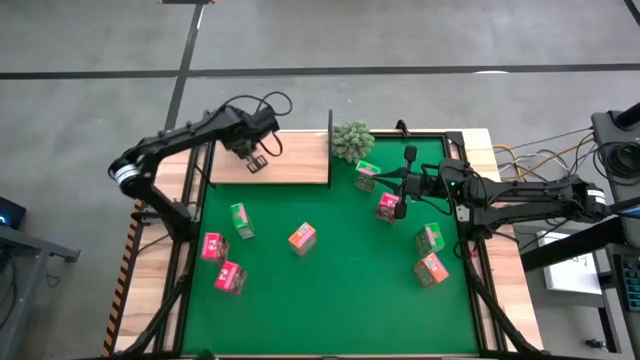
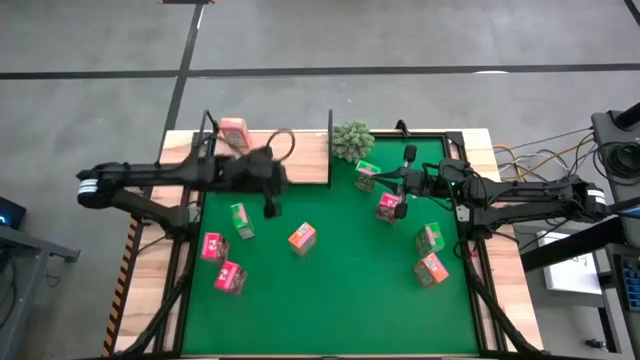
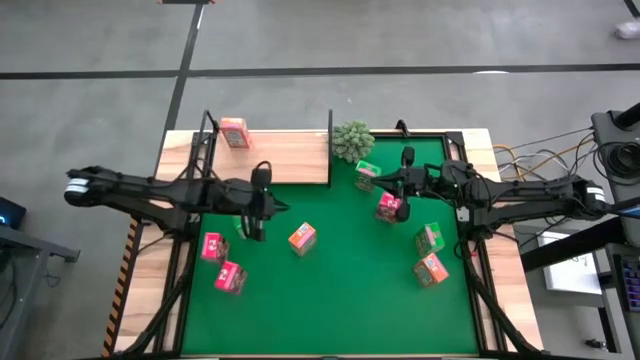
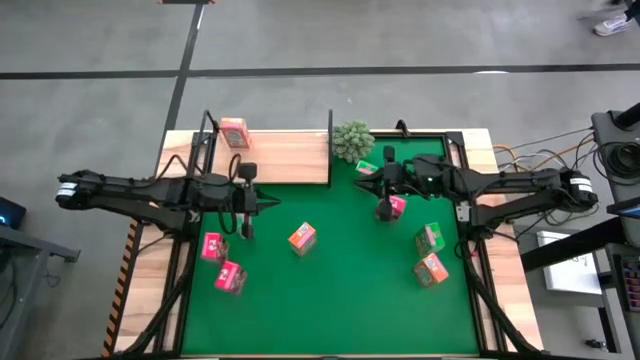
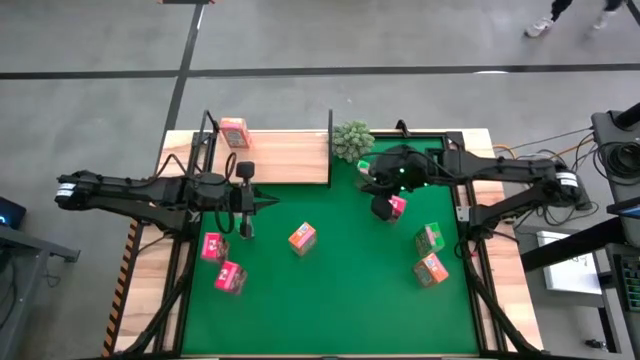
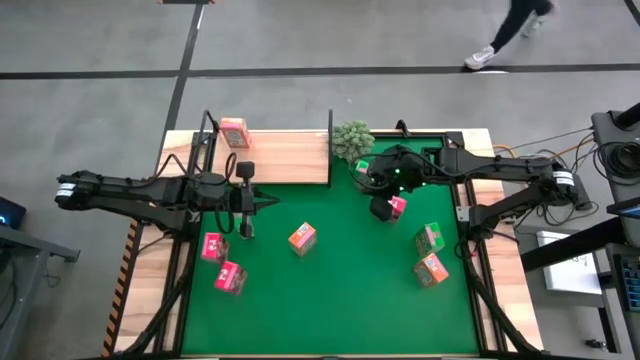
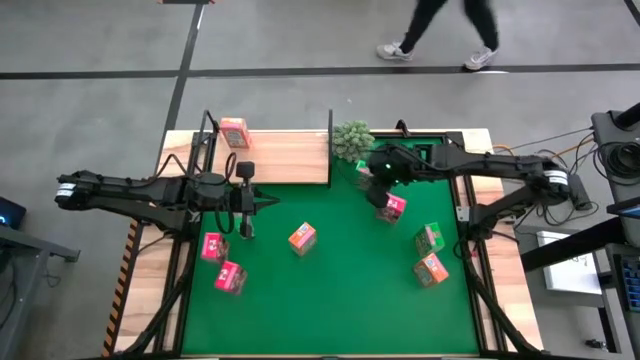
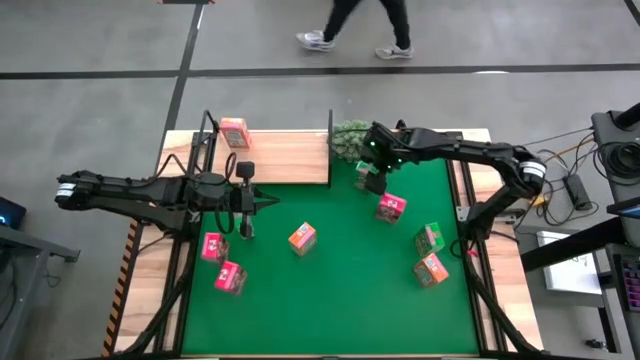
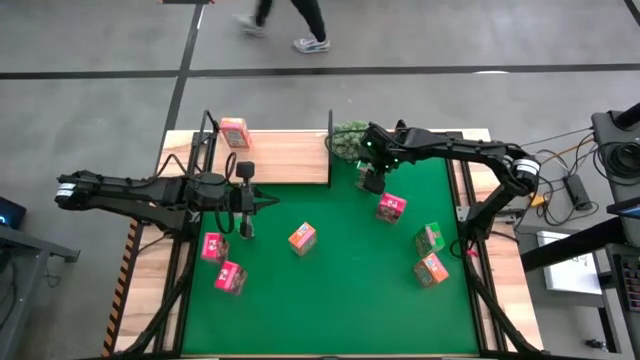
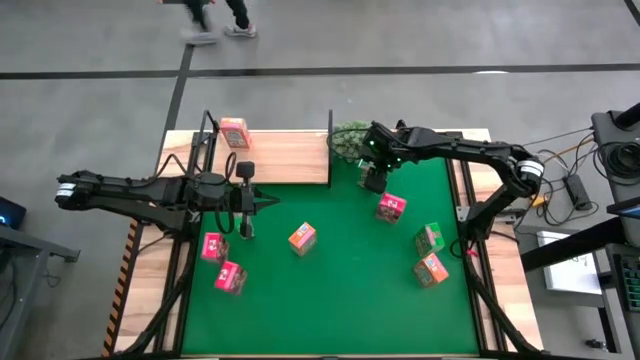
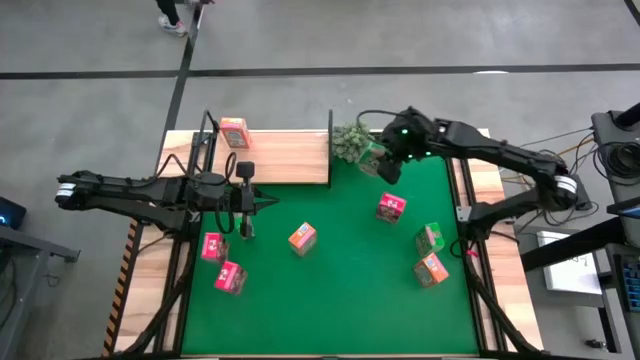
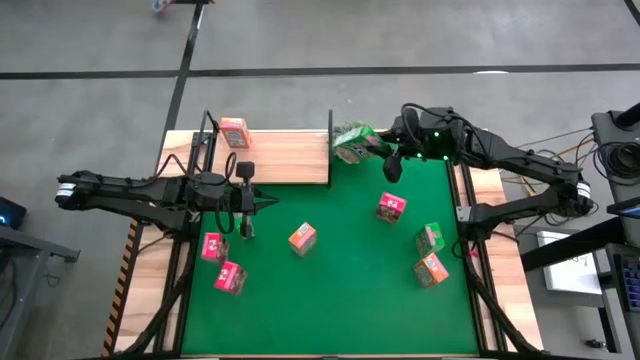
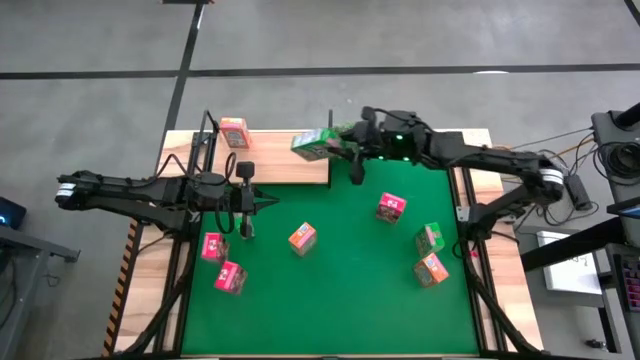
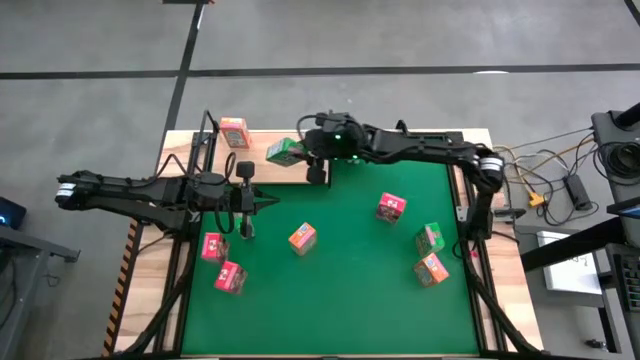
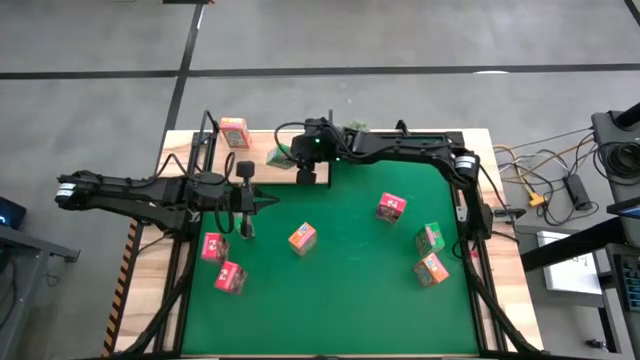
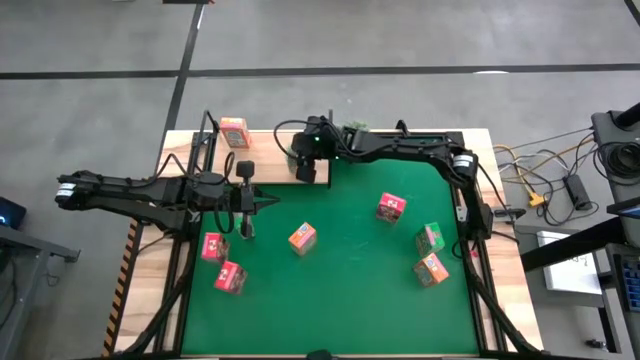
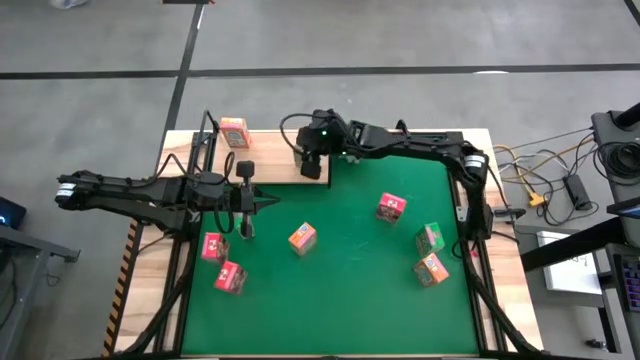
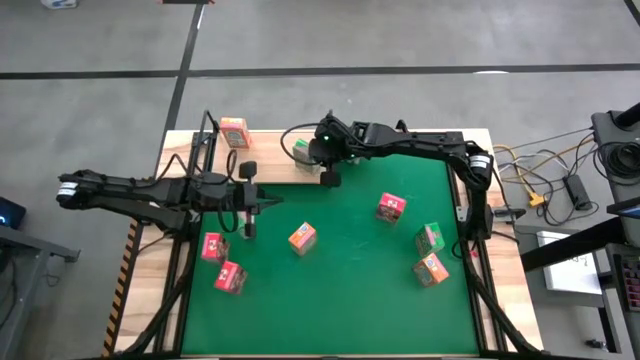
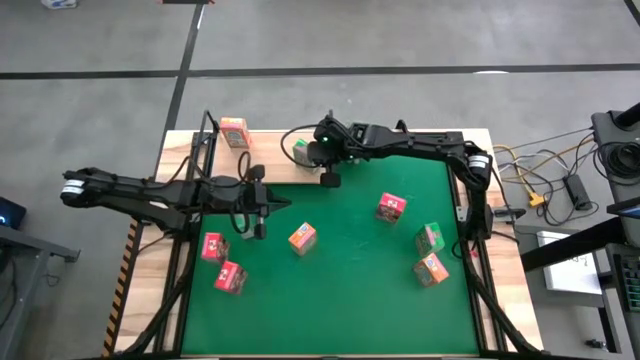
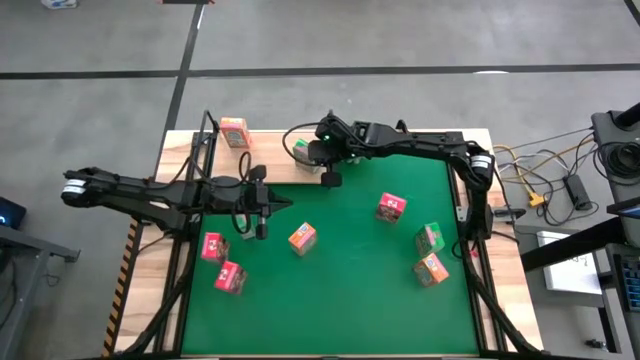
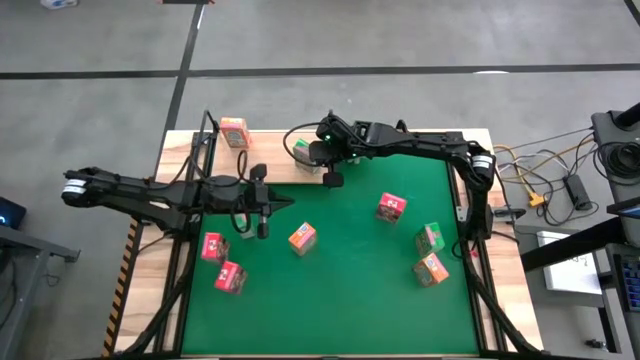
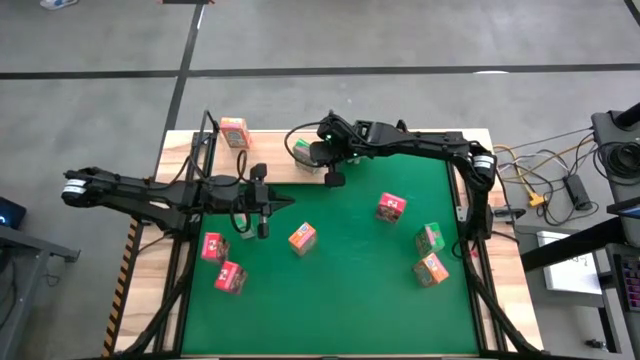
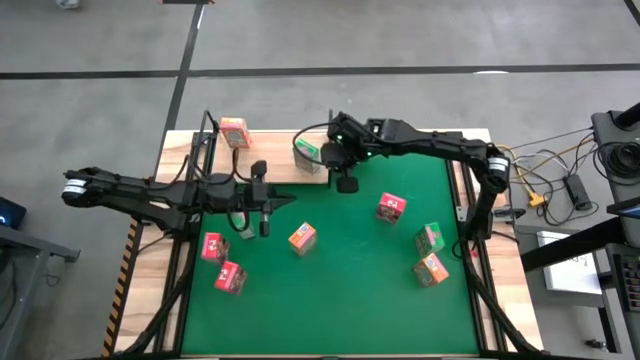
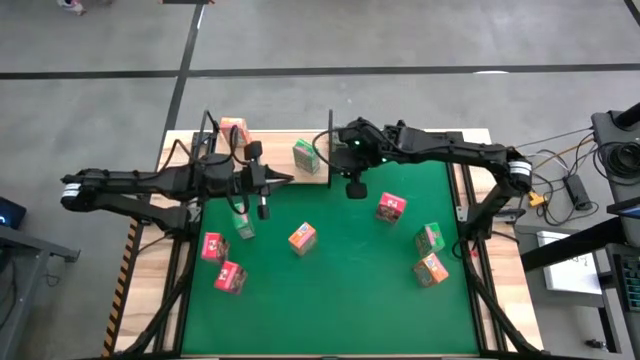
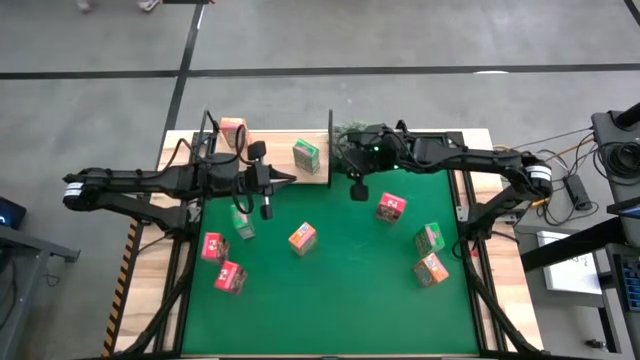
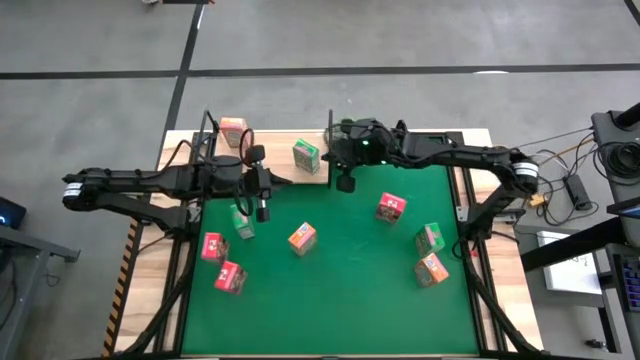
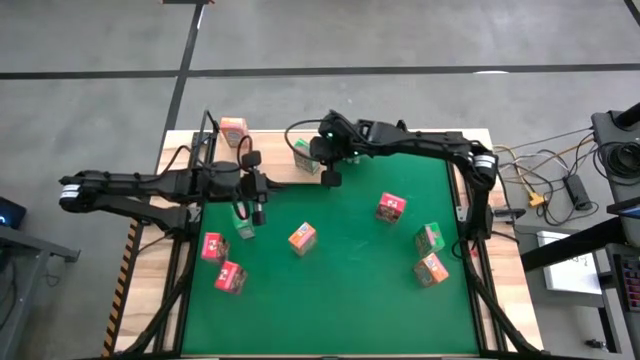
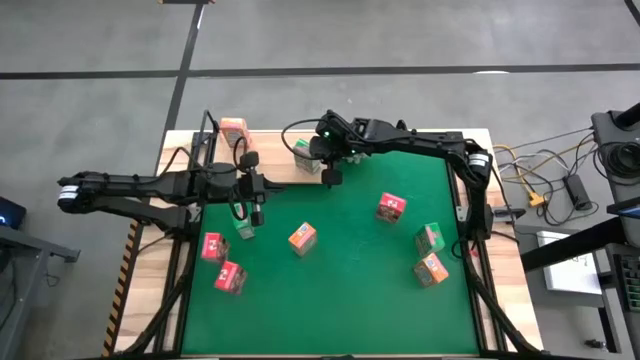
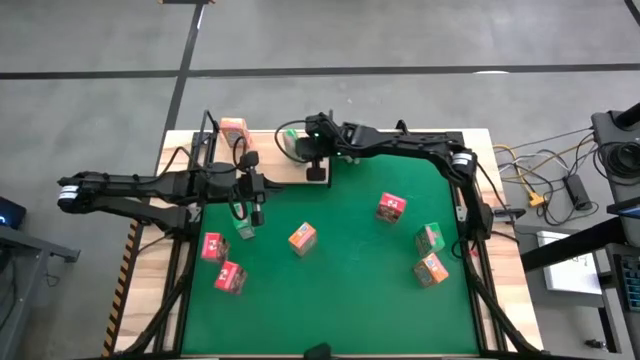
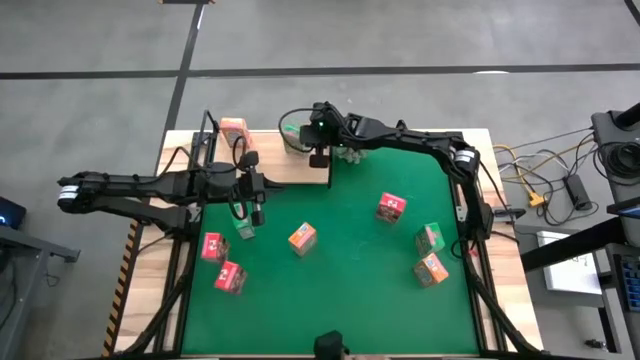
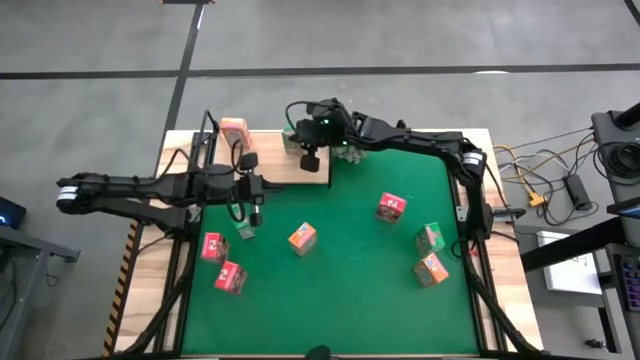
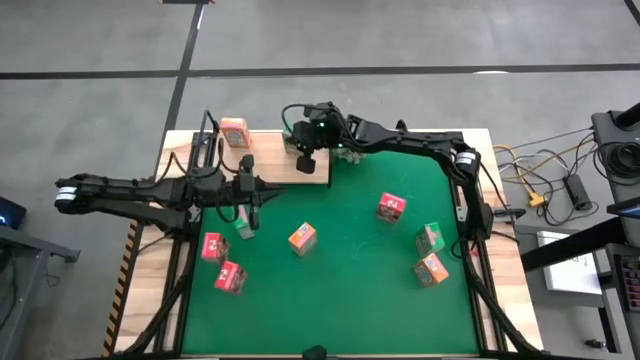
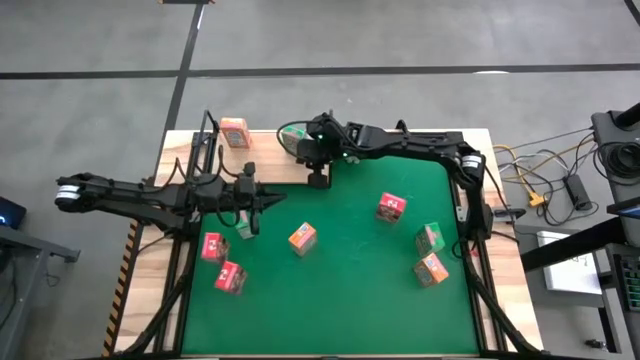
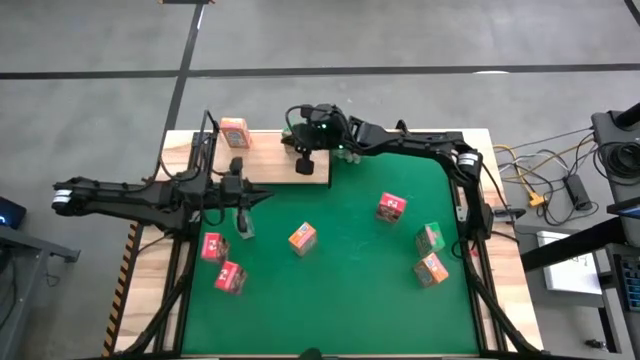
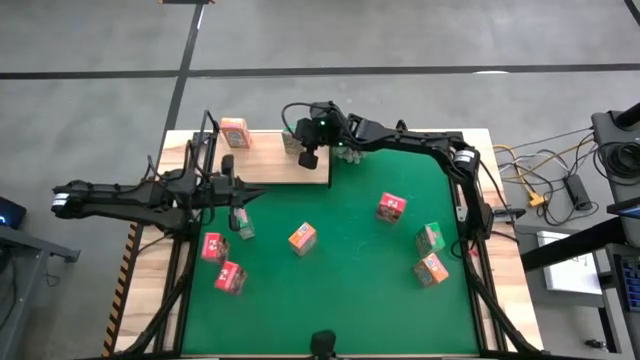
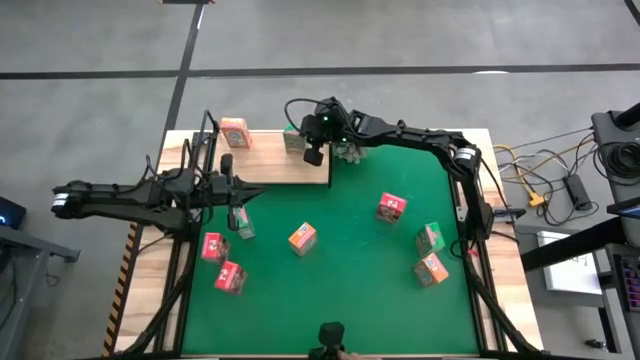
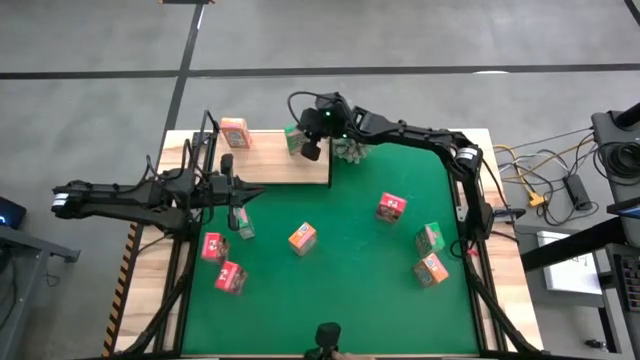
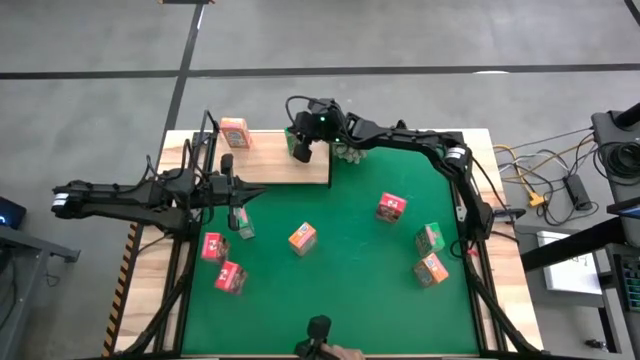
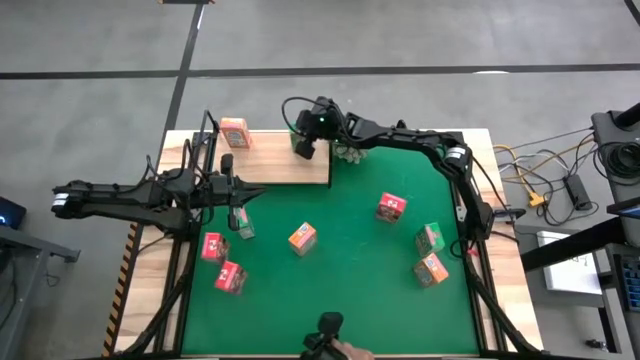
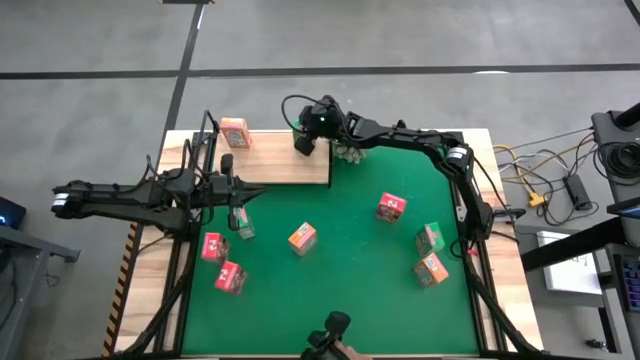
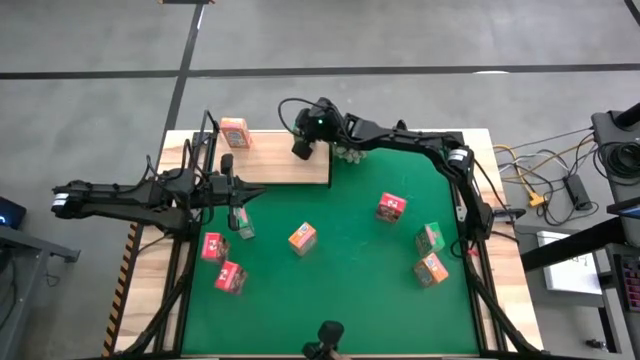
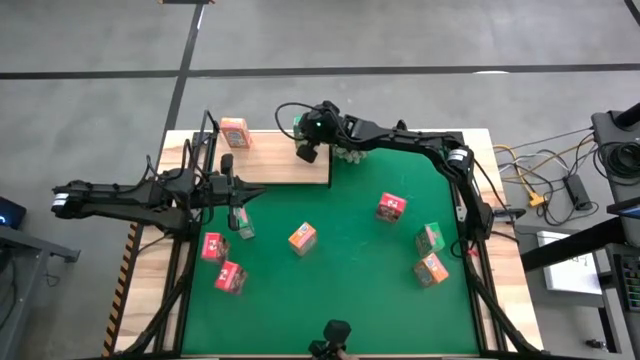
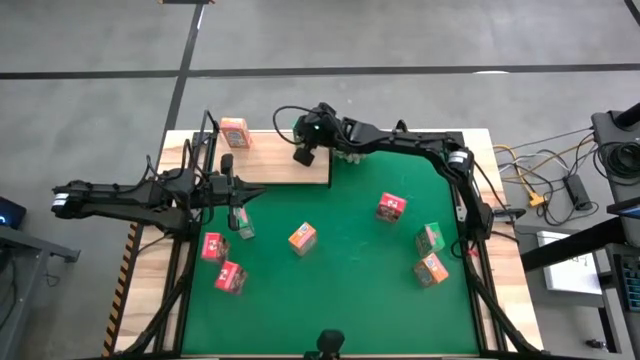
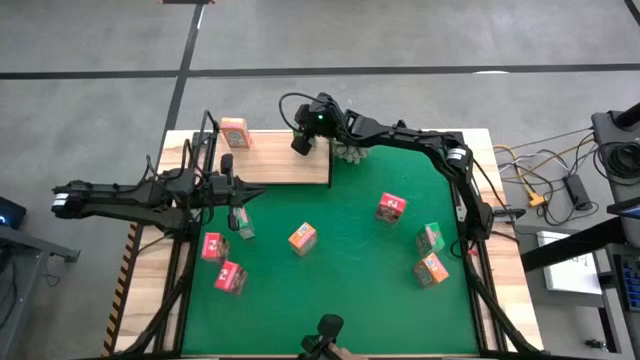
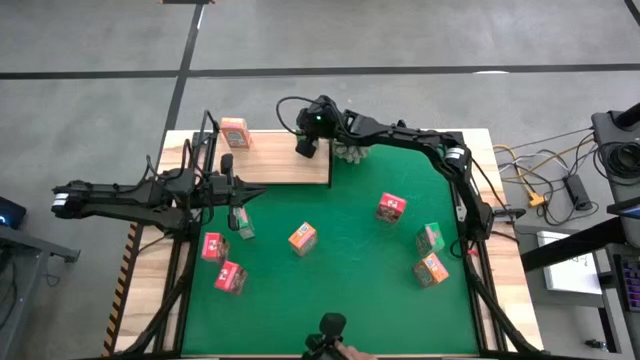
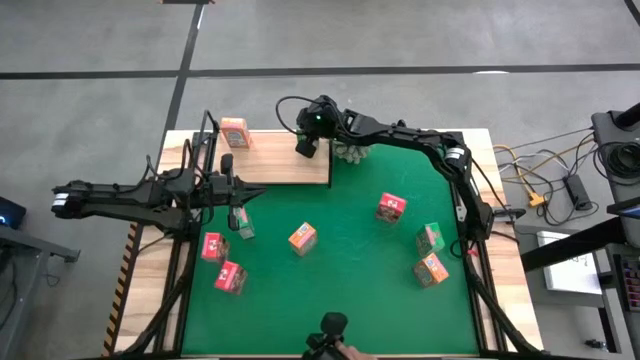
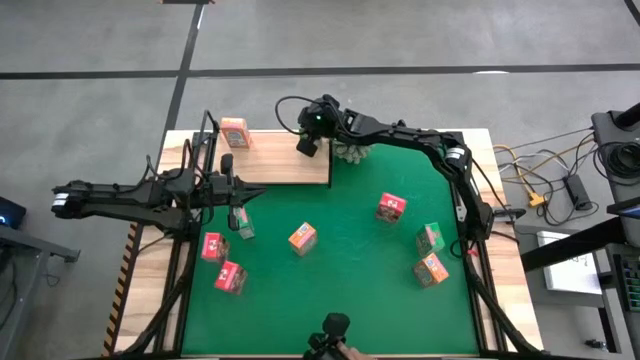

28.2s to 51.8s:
Task: Stack cereal on shelf
Put the top green cereal box on the shelf
